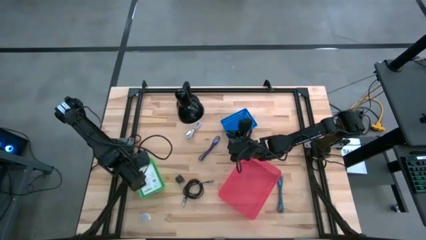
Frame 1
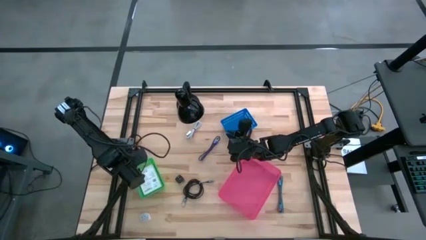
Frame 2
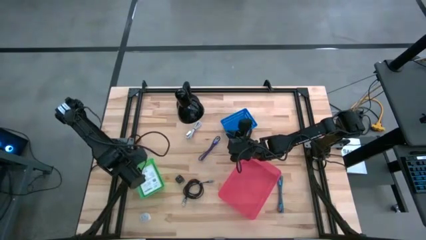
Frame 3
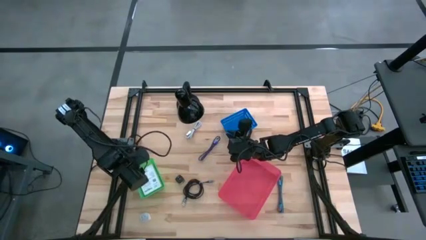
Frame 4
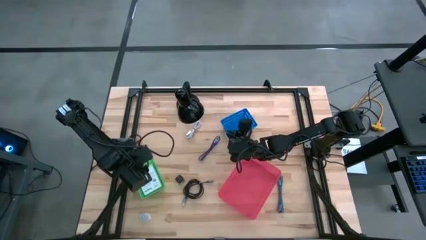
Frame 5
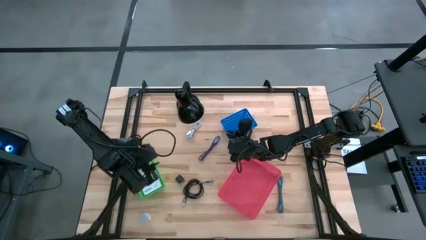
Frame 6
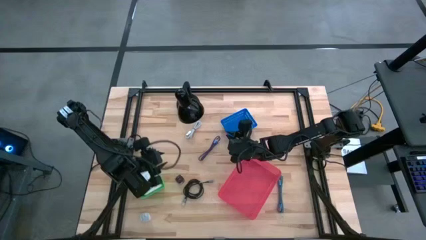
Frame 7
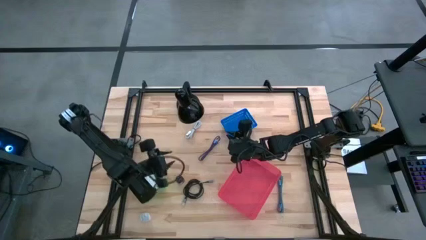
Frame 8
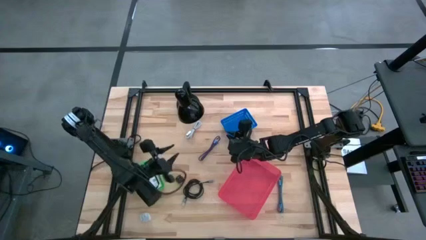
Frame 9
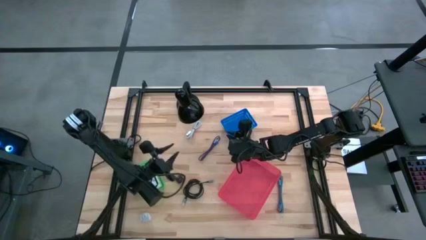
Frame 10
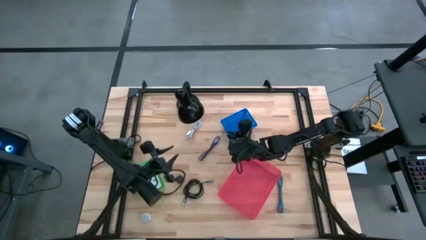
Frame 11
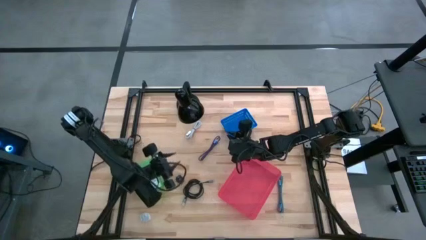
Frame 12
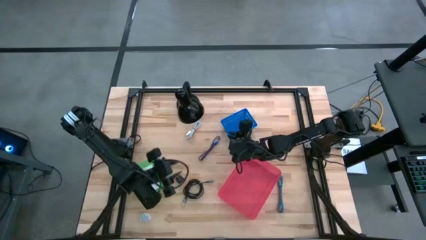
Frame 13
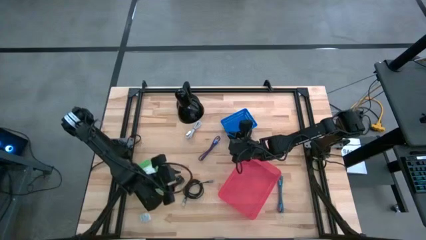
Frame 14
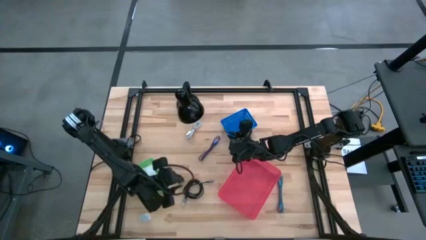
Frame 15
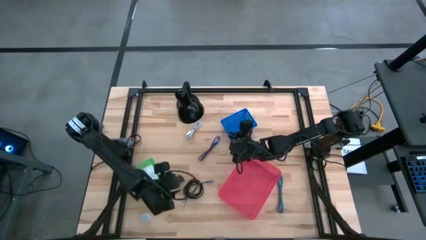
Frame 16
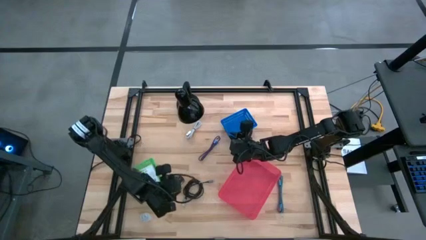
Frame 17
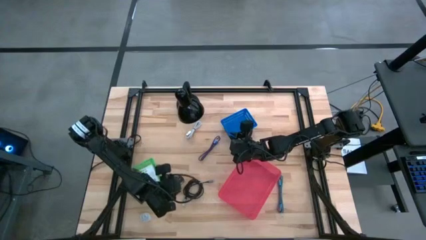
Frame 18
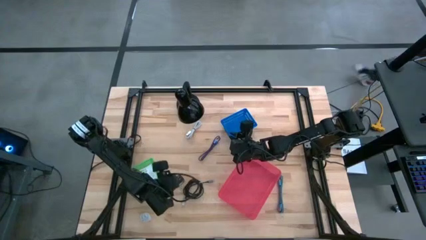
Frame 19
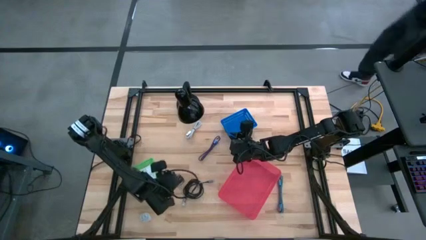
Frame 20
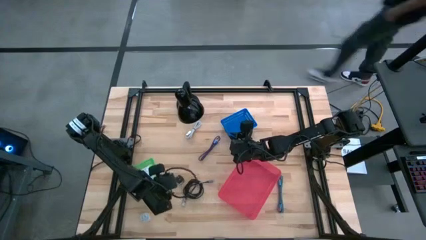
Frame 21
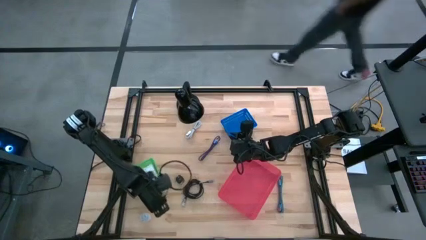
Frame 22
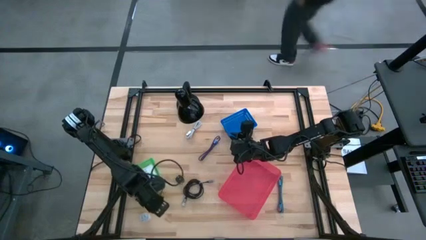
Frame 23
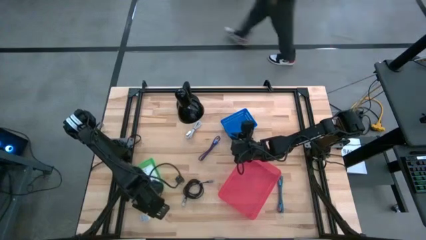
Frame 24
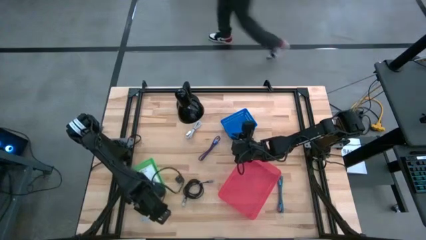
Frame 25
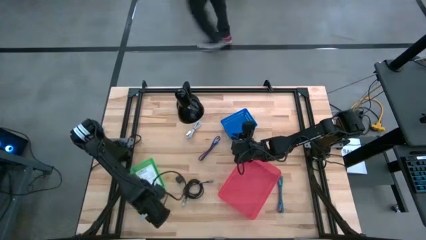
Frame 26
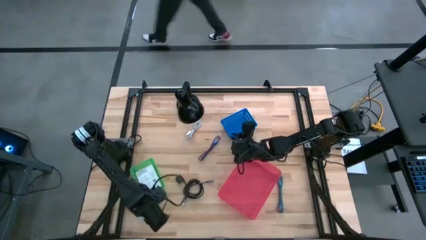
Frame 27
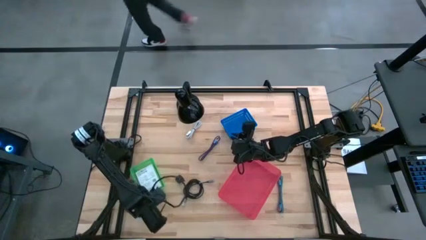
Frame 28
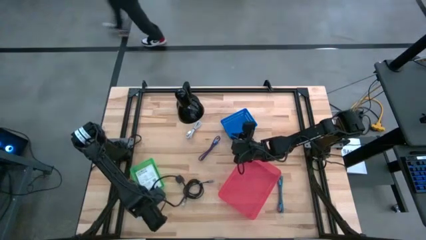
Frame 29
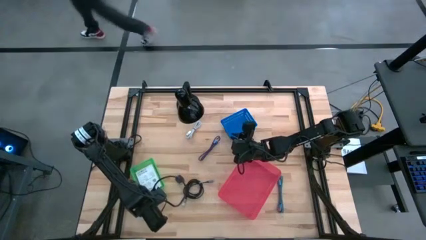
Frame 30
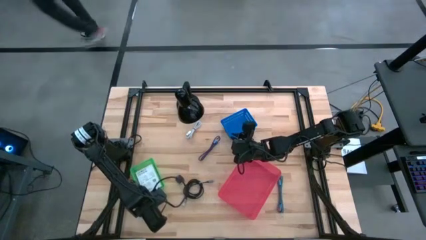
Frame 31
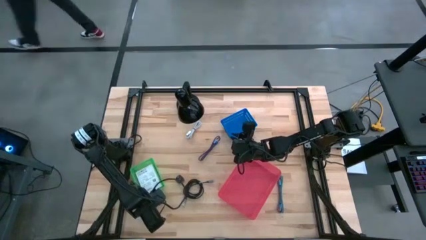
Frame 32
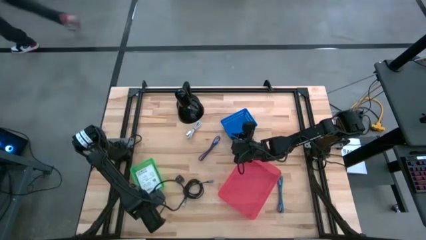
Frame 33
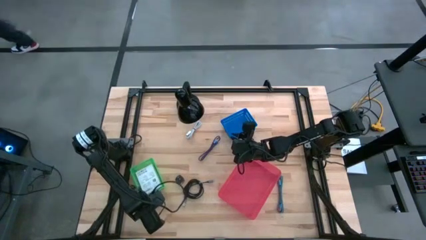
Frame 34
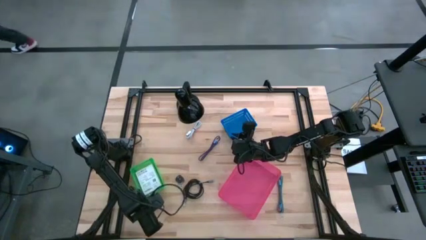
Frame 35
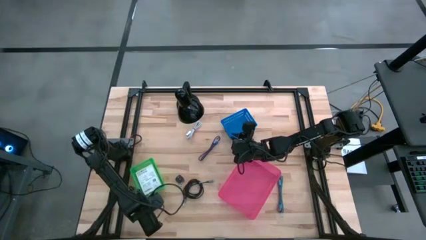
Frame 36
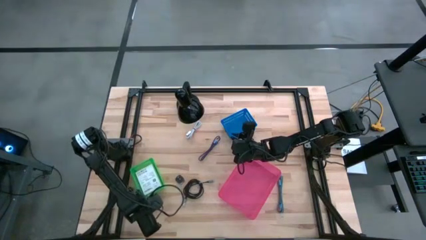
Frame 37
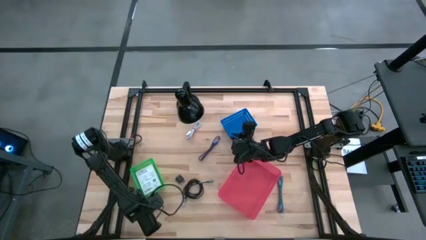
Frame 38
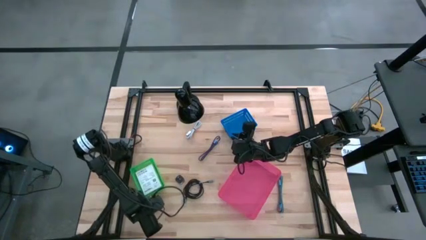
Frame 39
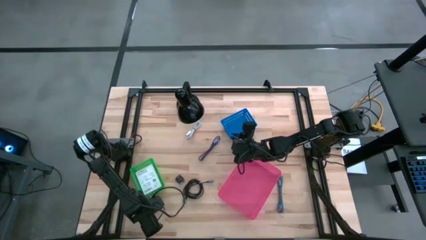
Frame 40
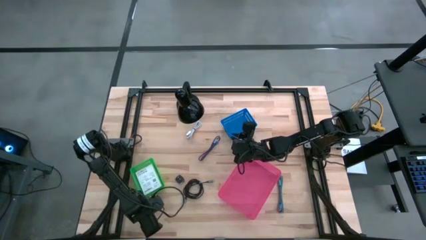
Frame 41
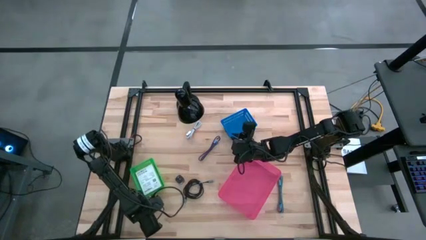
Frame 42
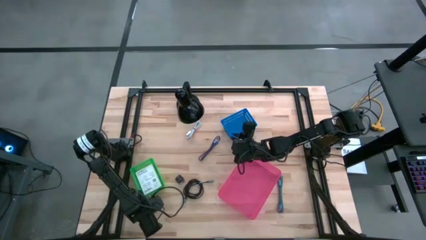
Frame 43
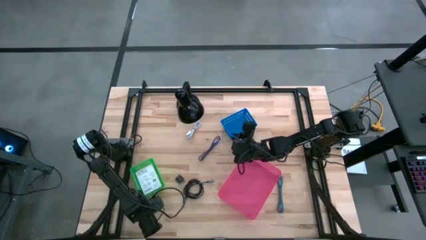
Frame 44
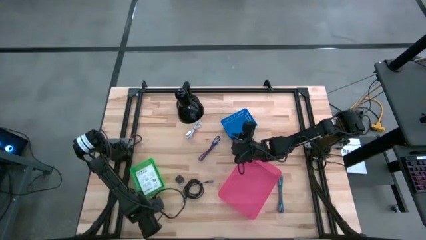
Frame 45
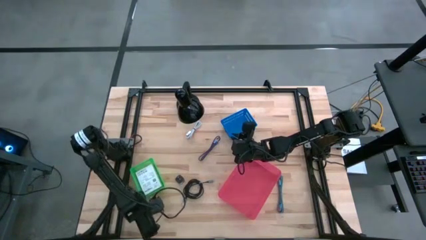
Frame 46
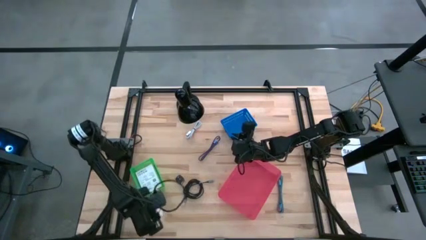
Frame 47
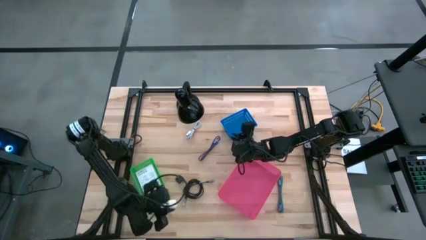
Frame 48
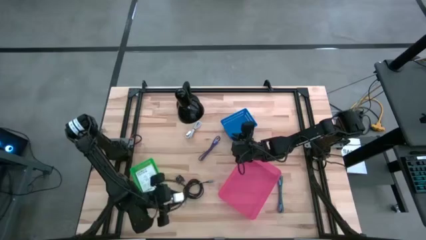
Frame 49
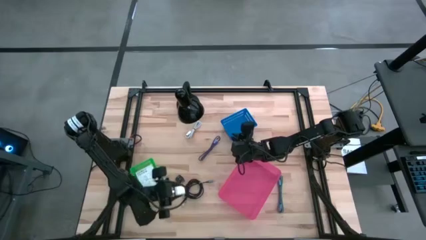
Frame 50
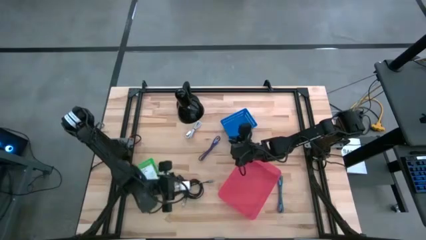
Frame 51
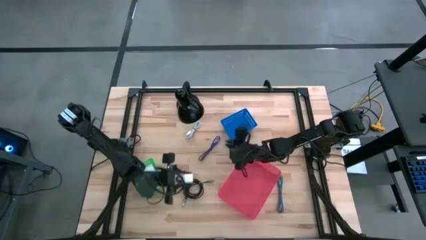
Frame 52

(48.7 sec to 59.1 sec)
Task: Pick and place items into bin
Put the white charger adapter into the blue bin
